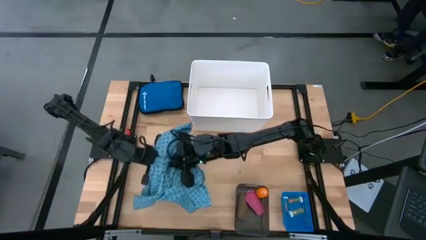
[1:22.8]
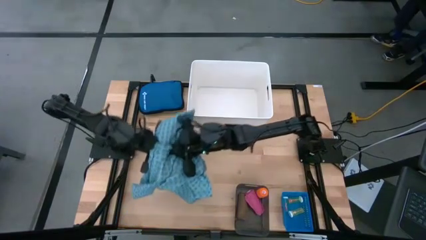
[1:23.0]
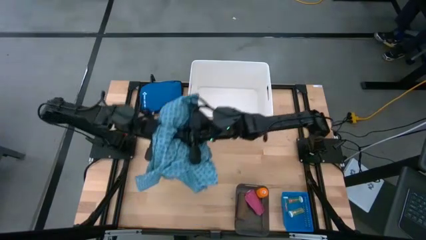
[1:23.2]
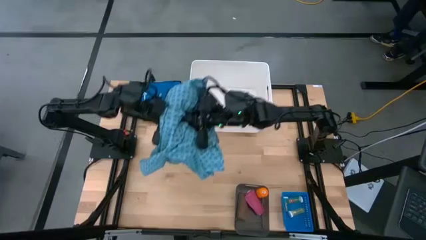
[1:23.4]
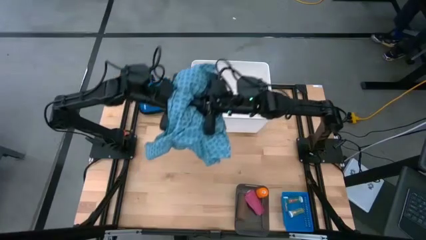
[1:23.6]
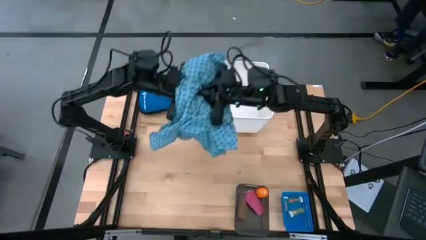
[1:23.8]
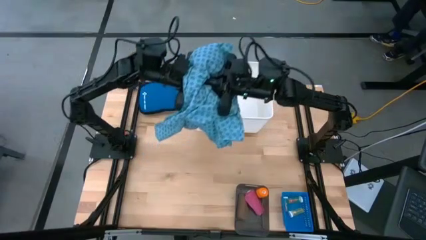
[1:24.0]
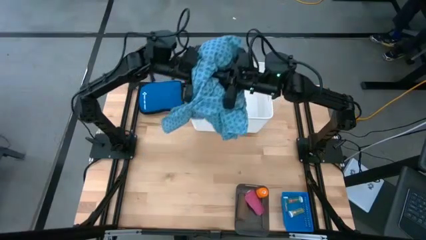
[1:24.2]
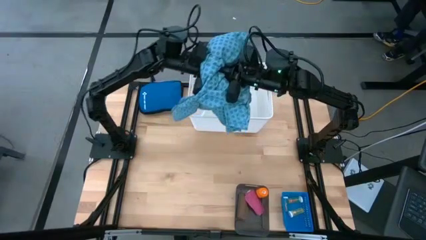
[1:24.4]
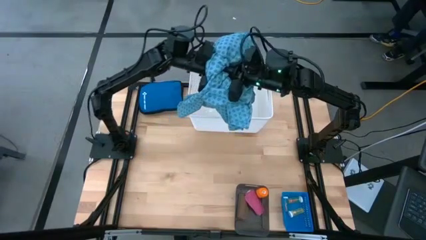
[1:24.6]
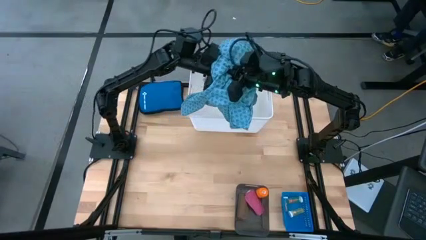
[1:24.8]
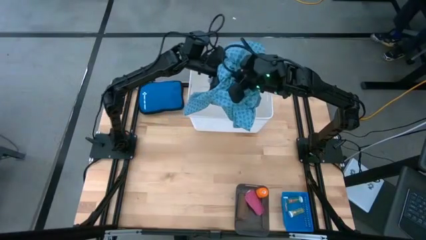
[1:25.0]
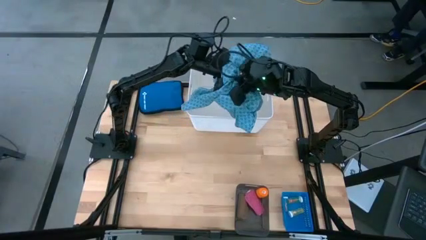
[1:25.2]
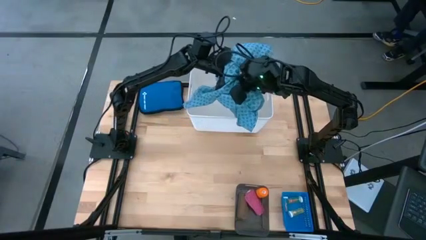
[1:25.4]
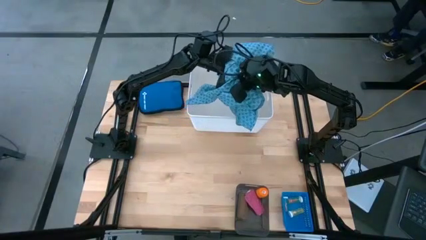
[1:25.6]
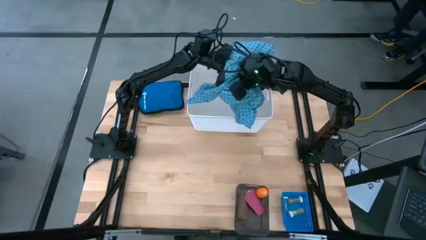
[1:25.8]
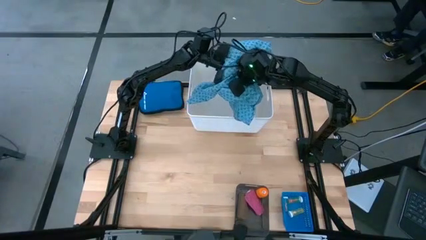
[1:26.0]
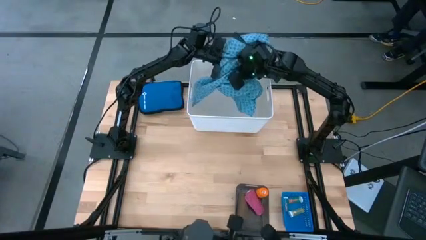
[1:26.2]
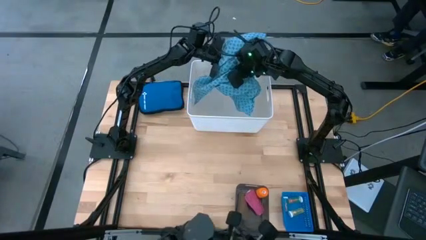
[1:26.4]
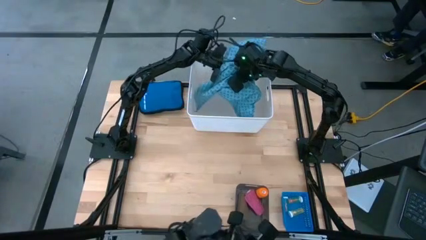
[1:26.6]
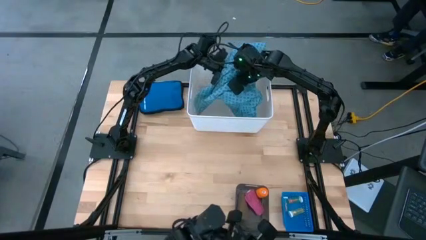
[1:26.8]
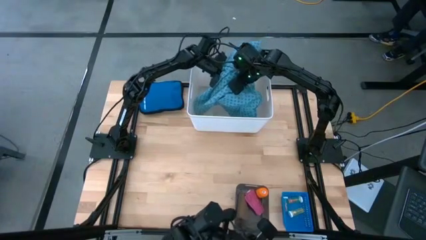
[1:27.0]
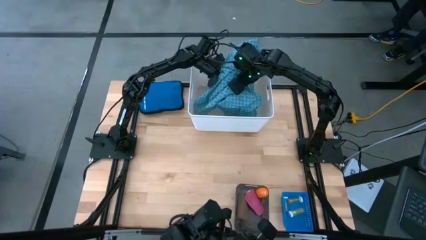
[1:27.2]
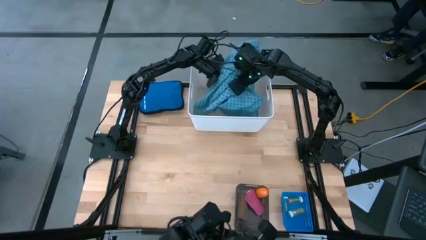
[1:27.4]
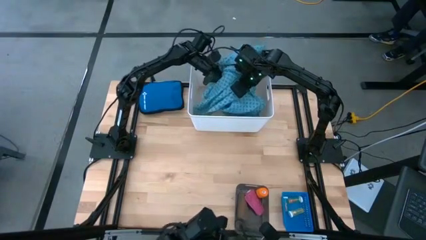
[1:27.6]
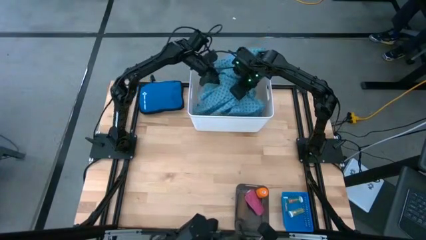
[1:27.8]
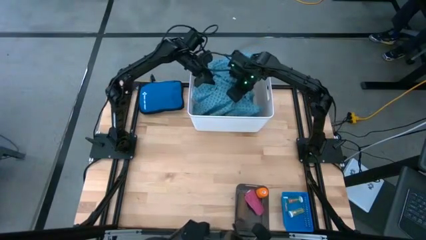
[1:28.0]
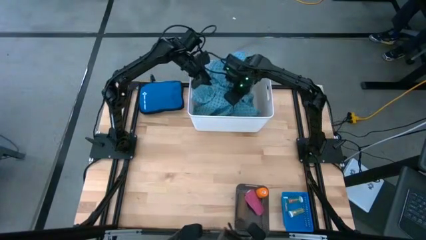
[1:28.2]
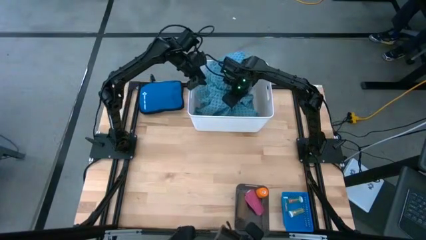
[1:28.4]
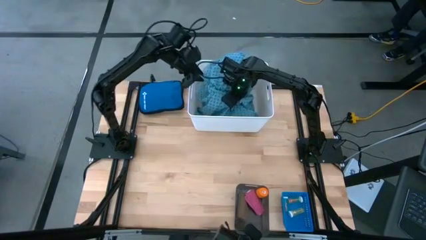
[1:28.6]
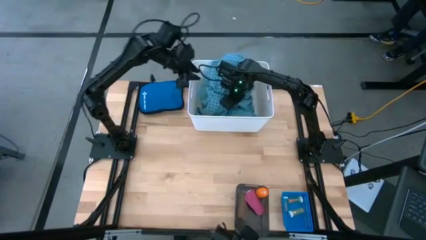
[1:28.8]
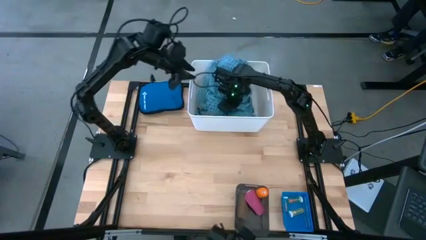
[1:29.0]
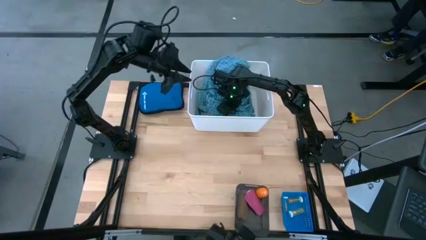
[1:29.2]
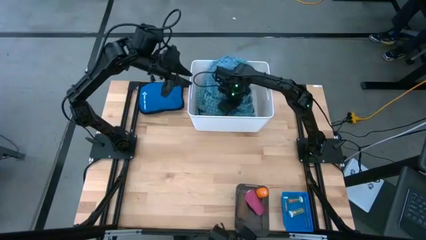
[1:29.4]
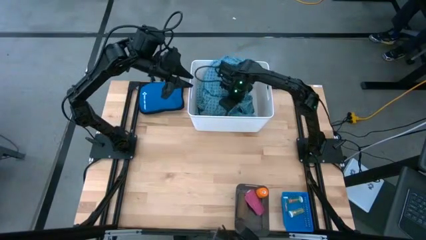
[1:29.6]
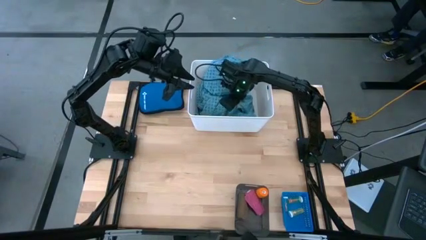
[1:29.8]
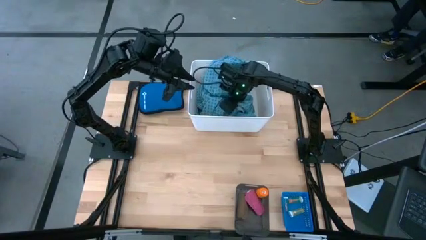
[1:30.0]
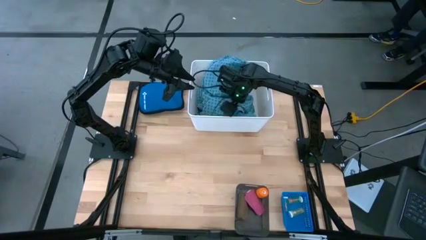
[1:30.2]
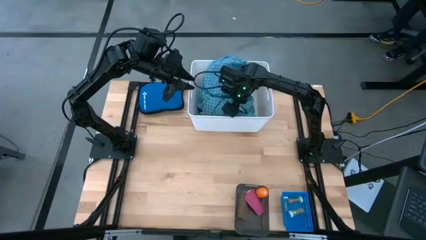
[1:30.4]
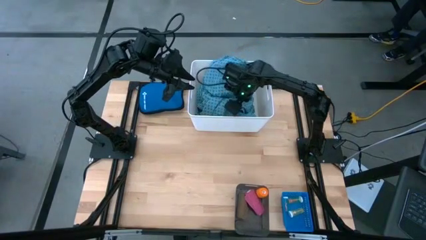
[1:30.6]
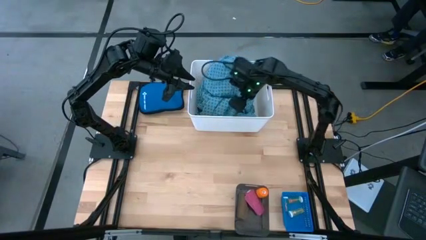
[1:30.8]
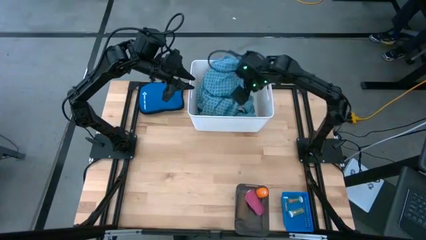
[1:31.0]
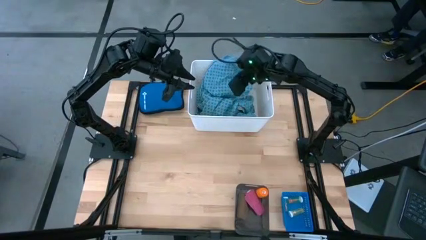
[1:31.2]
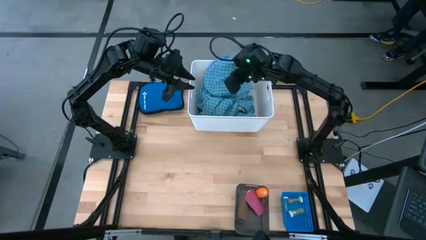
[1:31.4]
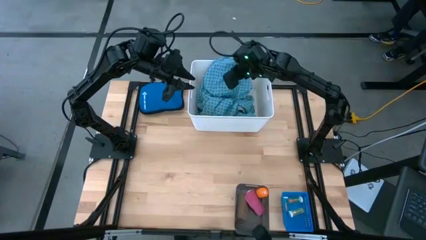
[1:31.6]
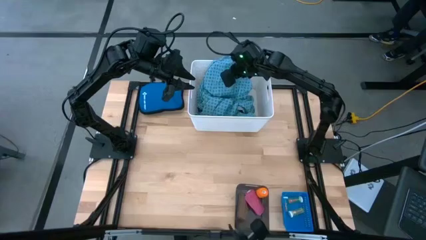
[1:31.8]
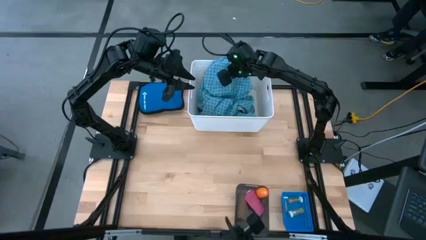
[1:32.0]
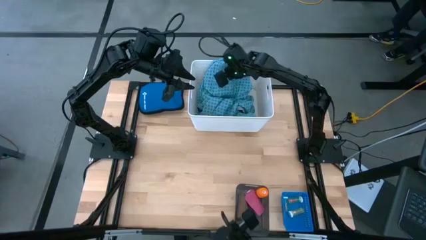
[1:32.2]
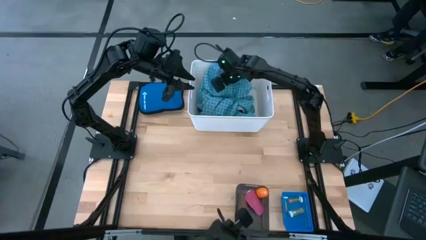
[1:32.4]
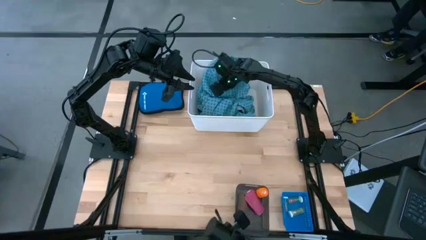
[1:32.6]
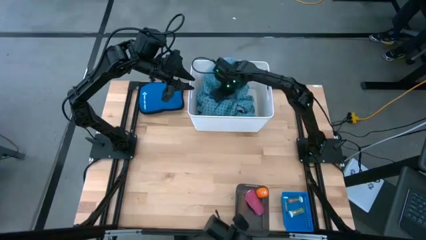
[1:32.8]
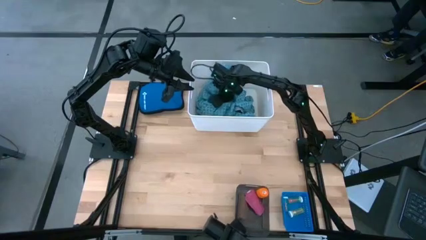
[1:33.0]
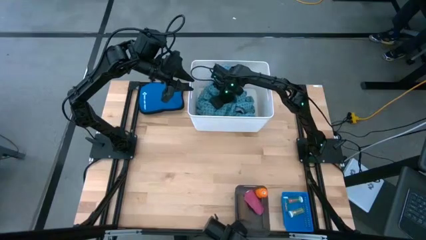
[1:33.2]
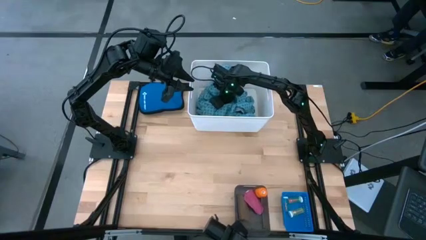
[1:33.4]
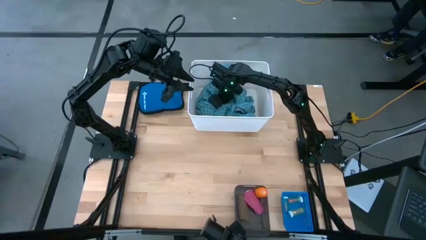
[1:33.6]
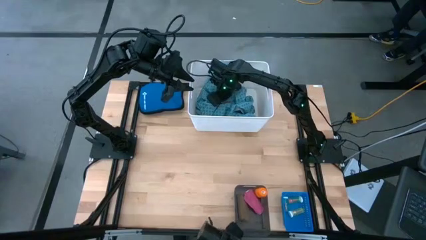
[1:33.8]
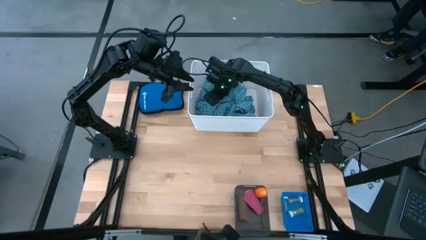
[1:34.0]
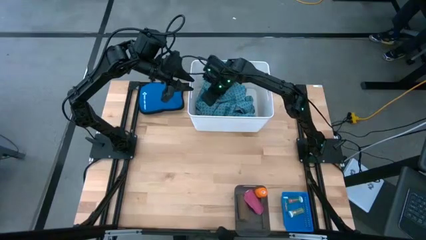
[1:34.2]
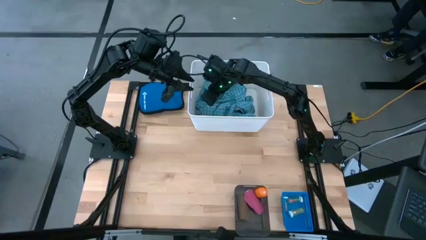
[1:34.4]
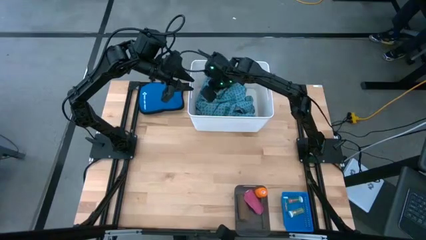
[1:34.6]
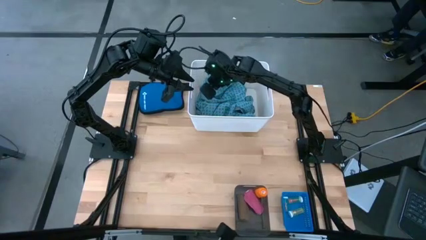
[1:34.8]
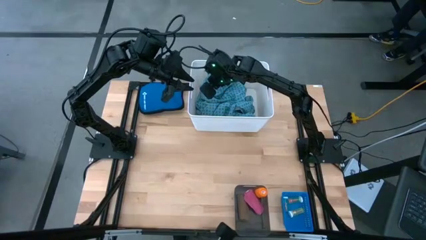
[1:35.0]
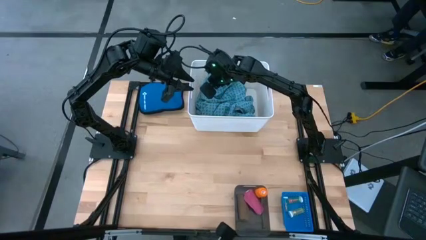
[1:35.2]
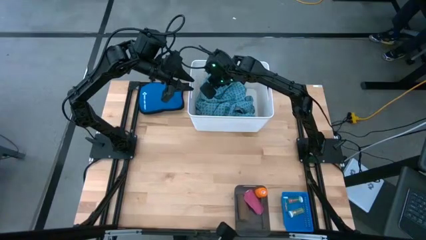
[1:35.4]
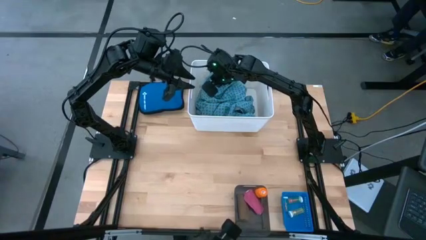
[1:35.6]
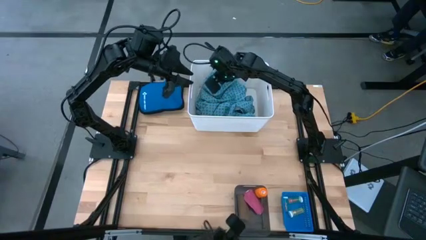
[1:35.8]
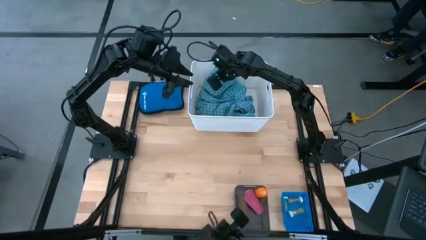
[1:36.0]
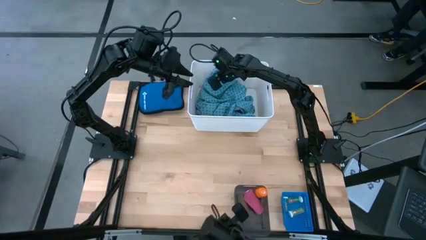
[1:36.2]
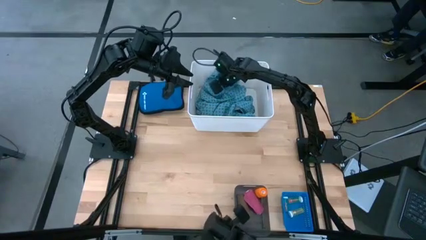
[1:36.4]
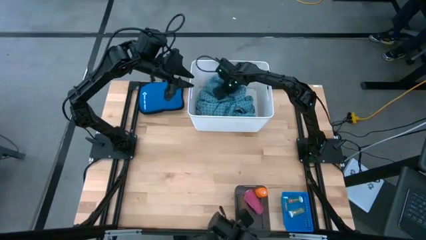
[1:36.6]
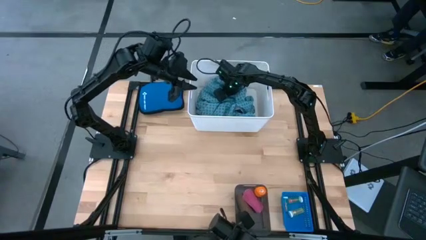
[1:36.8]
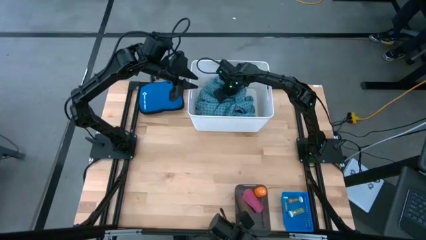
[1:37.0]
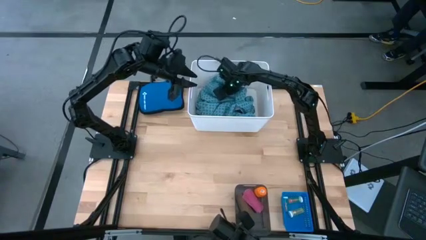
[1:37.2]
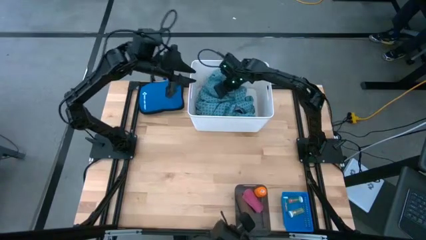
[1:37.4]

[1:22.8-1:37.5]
Task: Pick & place medical supplies in basket/bin
Put the blue patient gown into the white bin

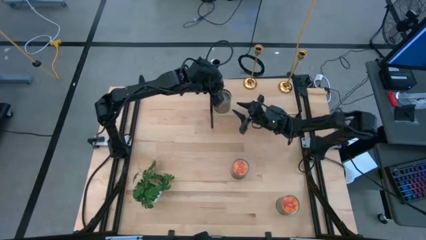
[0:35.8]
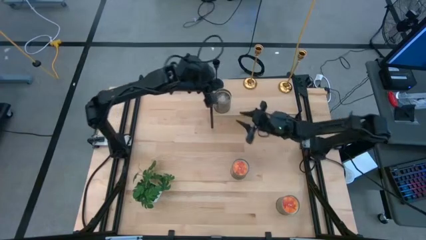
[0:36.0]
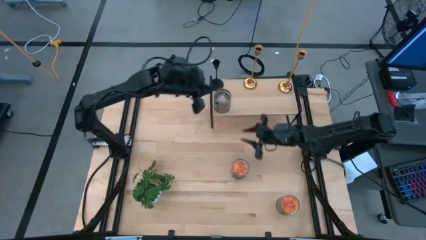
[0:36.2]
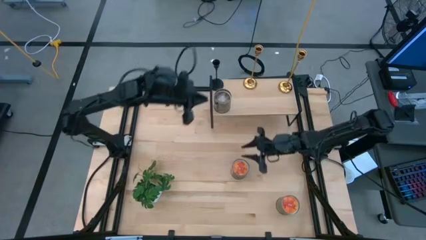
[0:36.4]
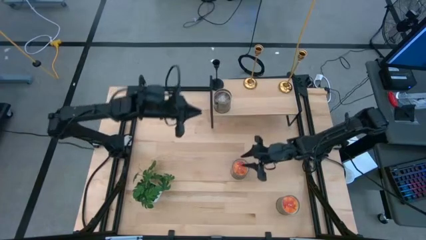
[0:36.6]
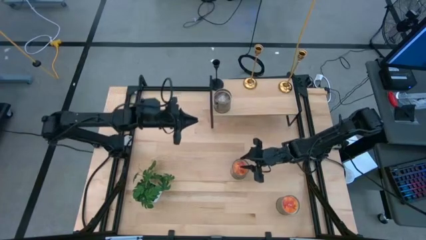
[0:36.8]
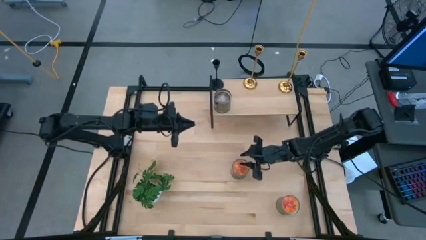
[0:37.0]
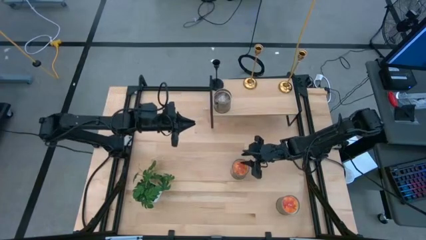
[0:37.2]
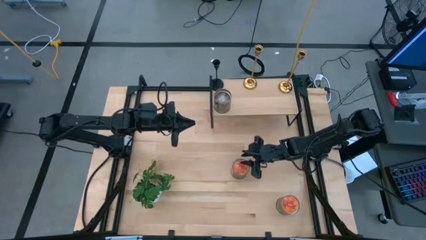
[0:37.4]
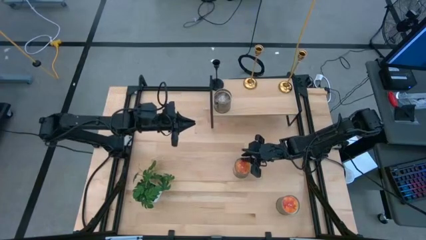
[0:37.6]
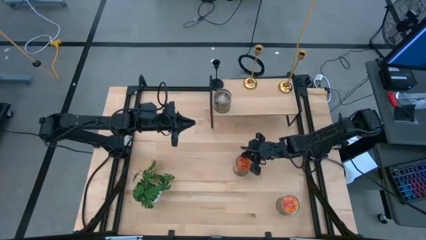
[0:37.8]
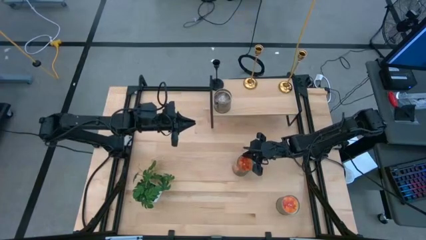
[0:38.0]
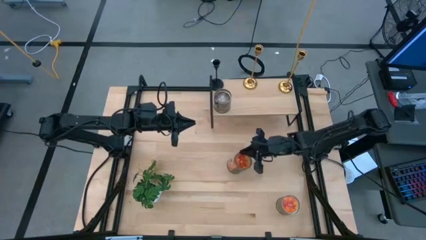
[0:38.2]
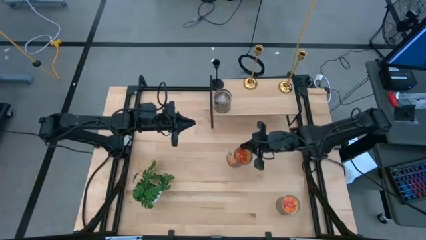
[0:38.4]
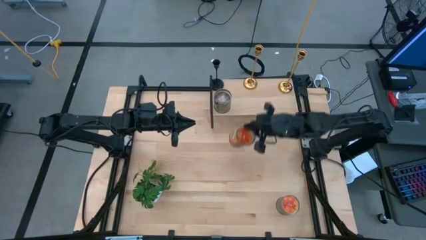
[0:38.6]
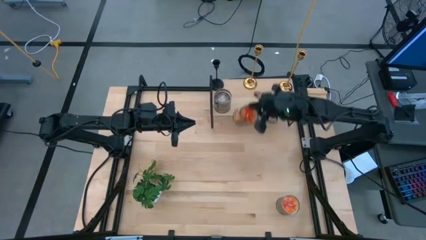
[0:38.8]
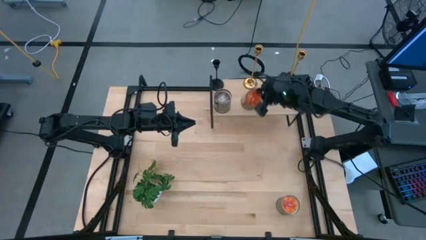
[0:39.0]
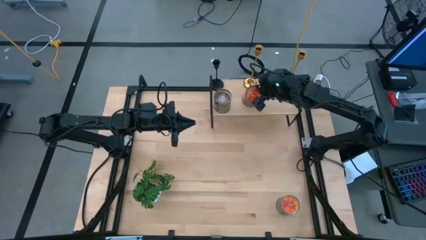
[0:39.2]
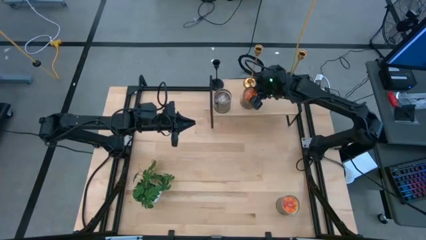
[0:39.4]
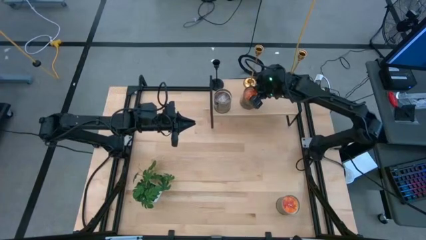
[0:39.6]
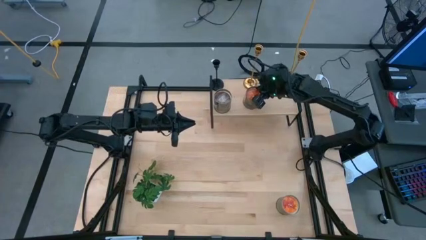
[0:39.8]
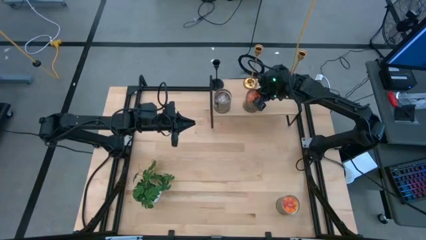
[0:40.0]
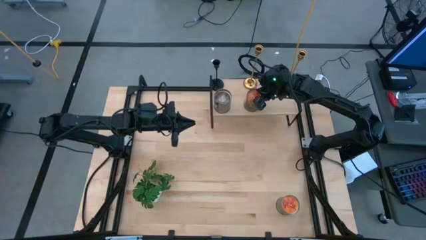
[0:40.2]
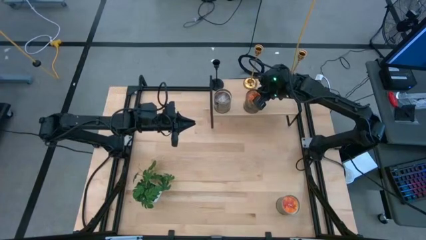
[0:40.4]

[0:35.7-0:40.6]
Task: Pick & Place candle stick holders
Put the top orange scented candle on the shelf
